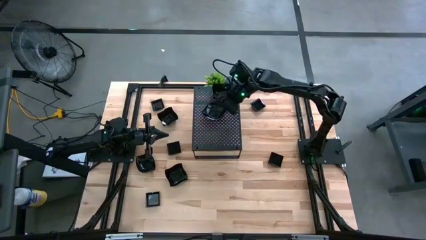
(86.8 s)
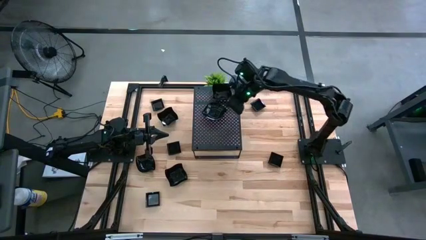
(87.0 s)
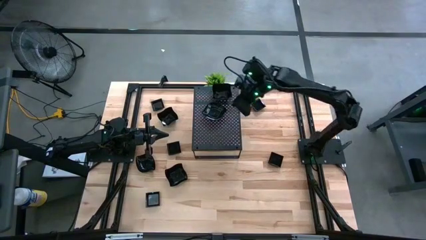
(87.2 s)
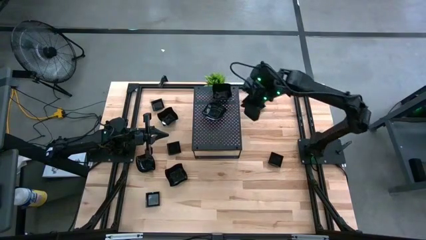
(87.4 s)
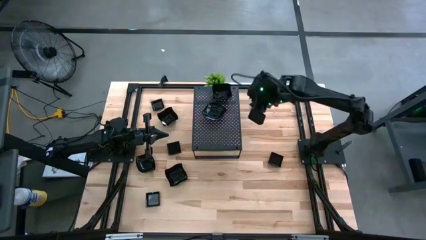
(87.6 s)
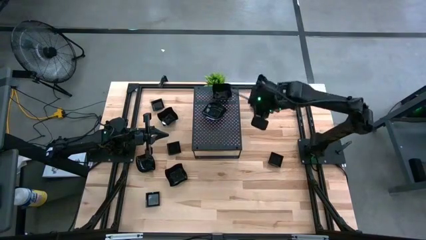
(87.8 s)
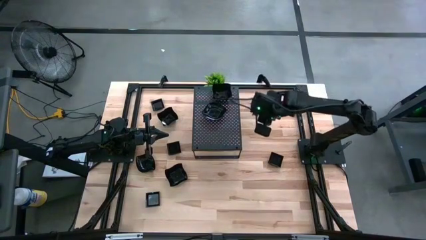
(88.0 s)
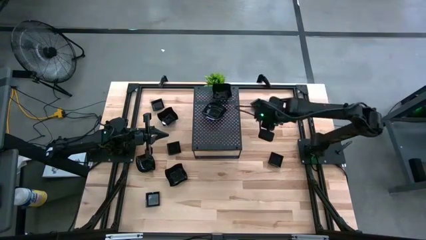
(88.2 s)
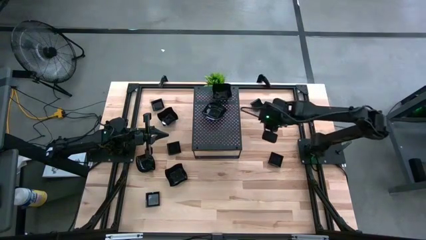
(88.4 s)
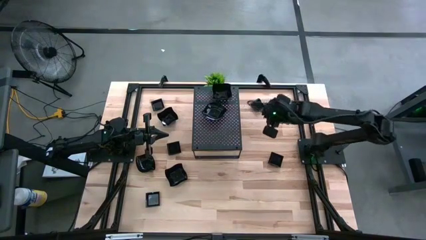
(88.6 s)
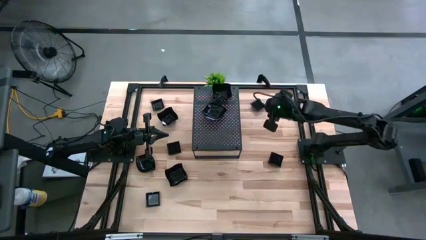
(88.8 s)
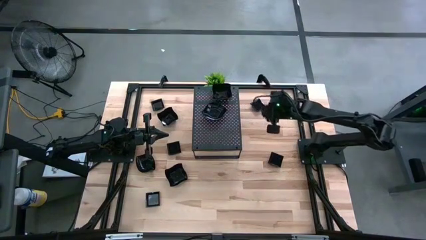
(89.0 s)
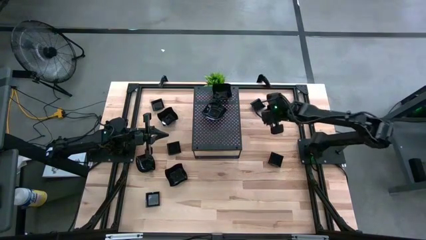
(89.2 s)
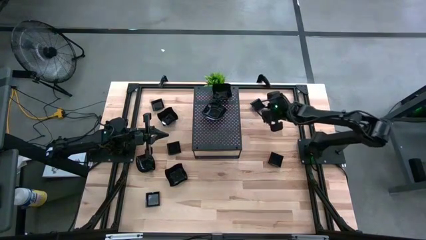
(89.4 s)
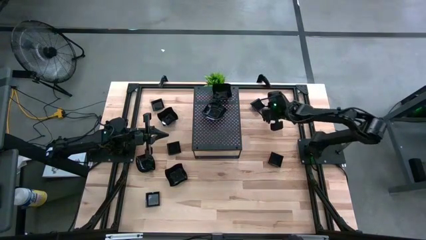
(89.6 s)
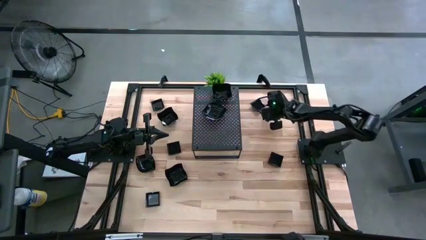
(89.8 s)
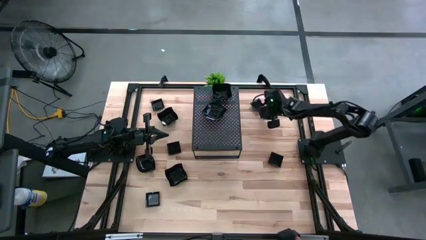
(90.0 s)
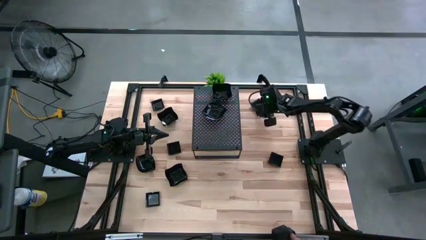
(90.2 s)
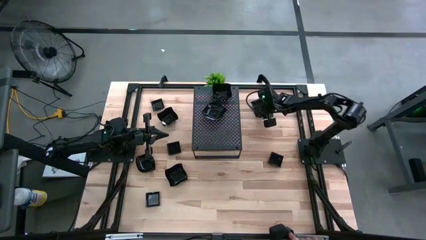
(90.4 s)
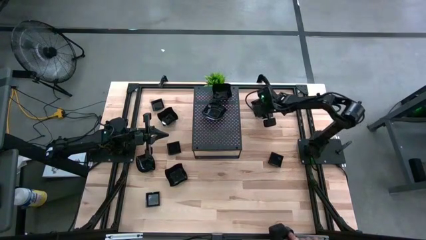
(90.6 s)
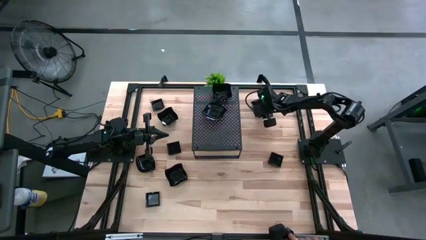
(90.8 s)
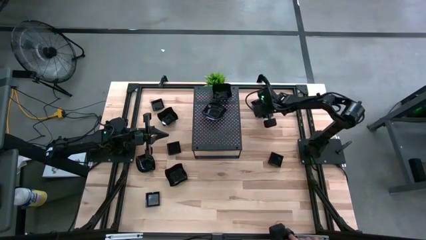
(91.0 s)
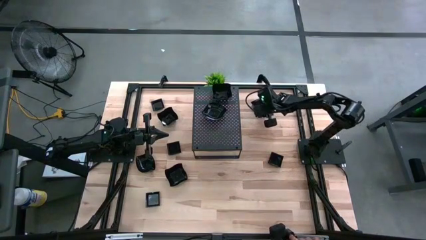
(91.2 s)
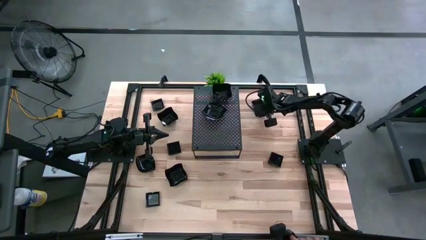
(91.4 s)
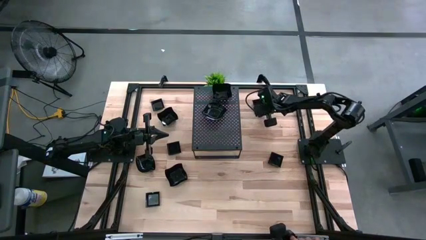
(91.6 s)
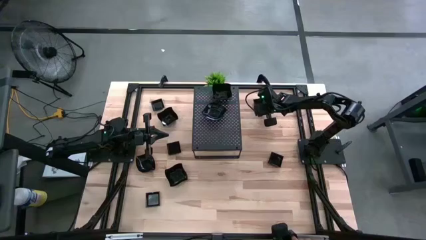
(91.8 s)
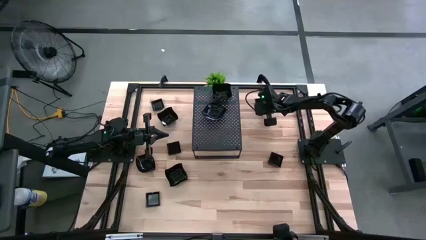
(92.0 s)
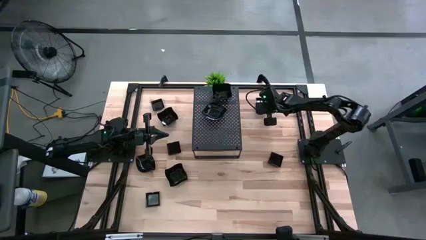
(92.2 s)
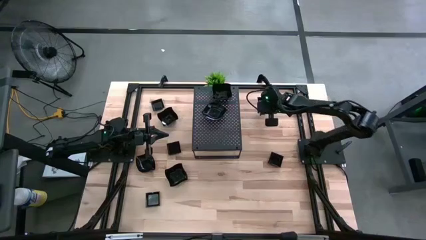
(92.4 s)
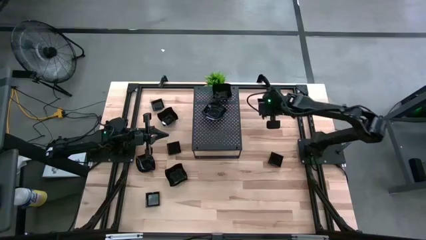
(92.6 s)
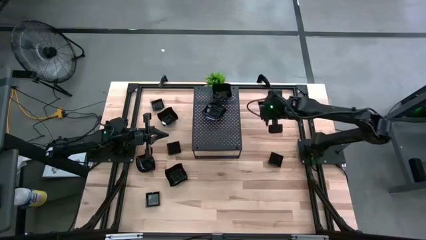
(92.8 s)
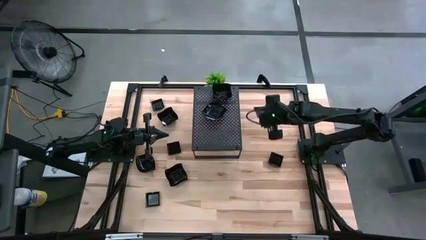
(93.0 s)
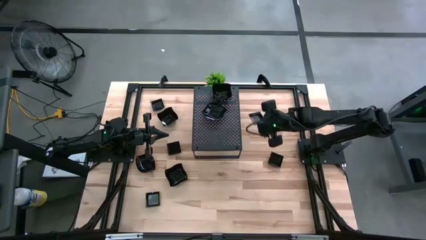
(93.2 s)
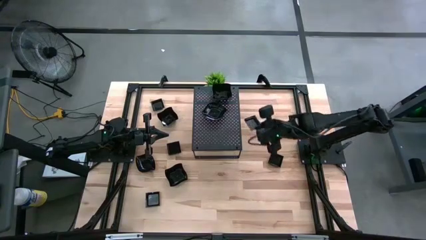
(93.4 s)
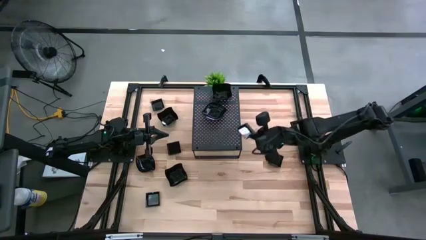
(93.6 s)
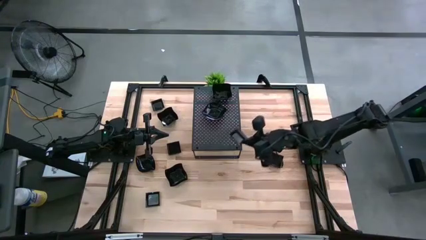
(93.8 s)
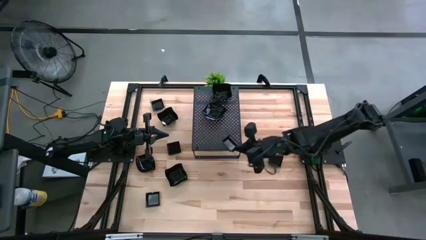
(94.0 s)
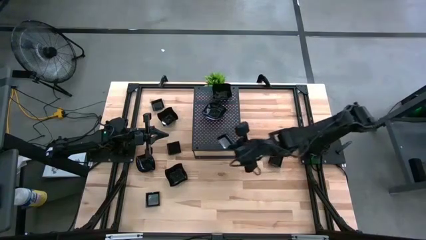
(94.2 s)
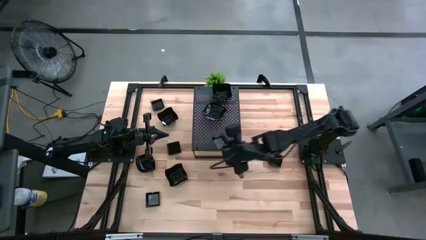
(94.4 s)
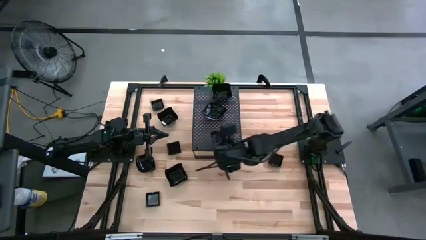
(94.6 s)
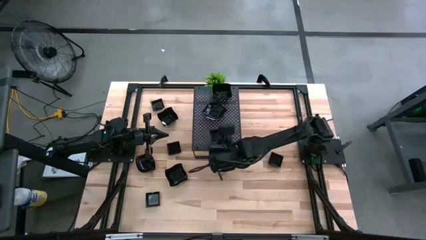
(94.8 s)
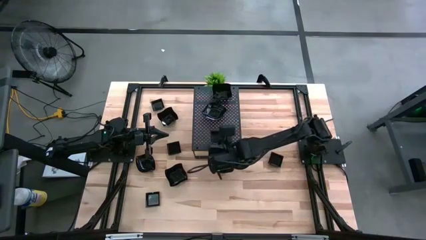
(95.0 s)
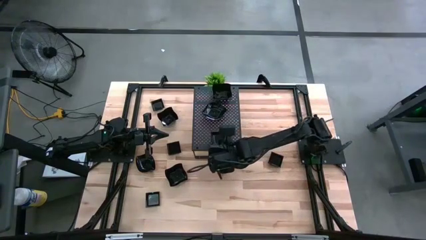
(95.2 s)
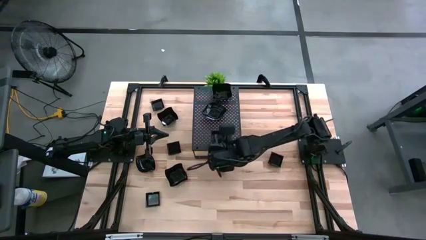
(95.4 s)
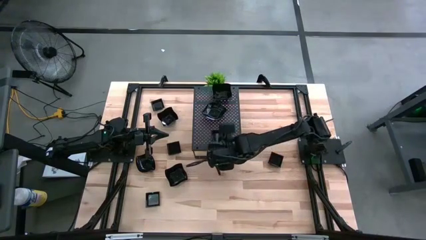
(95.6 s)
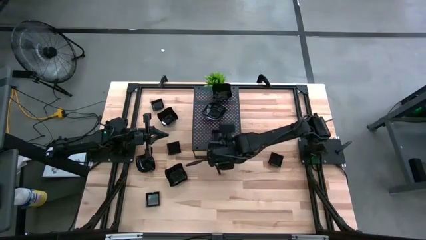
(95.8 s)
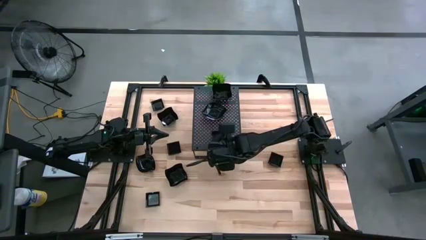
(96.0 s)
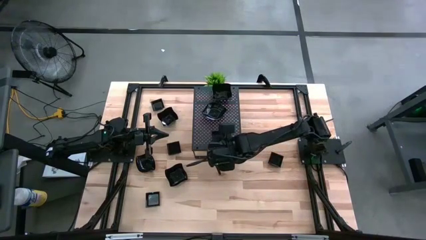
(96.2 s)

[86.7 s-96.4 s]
Task: Pick & Place Mini shaped plates
Put the square plate on the shelf

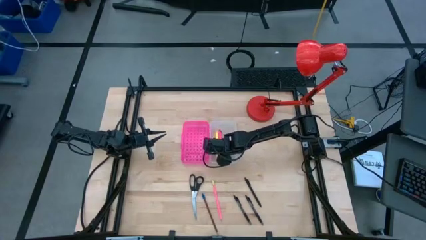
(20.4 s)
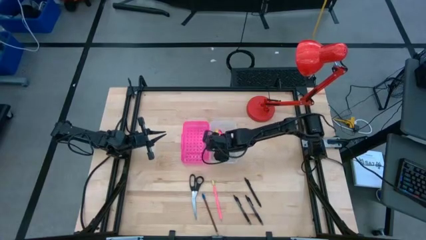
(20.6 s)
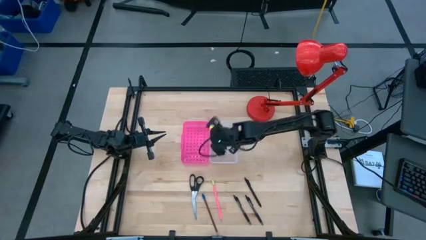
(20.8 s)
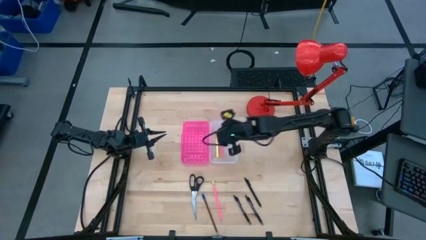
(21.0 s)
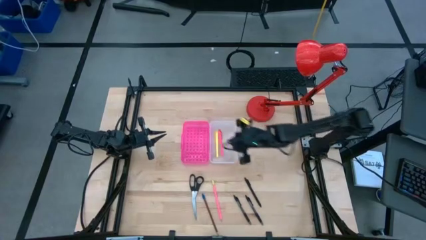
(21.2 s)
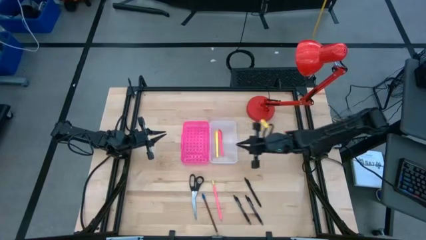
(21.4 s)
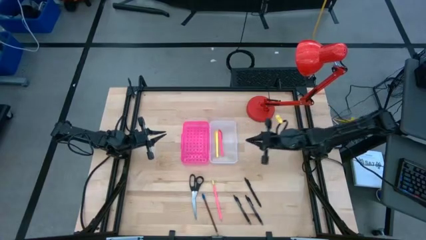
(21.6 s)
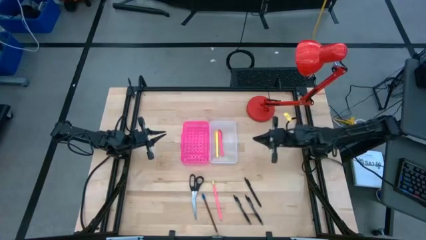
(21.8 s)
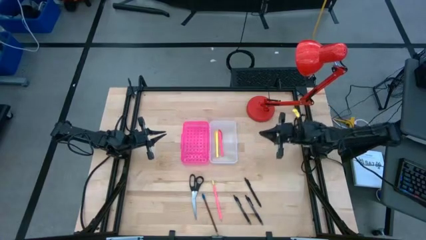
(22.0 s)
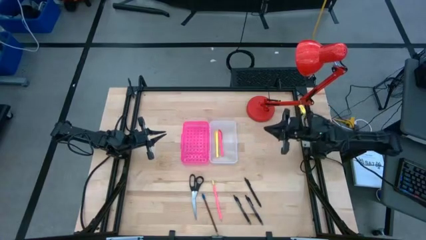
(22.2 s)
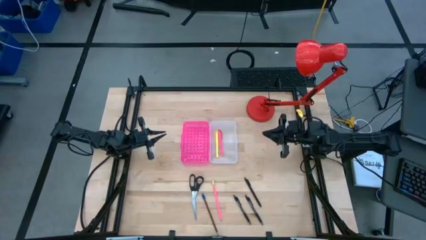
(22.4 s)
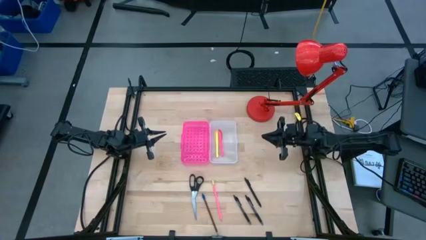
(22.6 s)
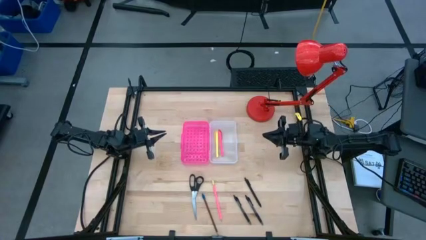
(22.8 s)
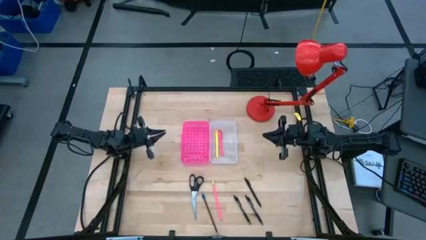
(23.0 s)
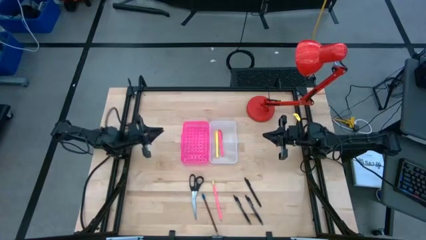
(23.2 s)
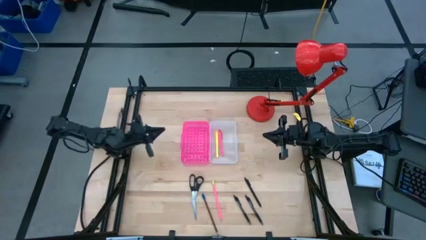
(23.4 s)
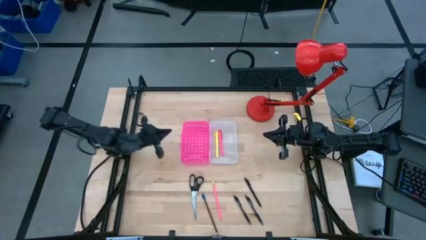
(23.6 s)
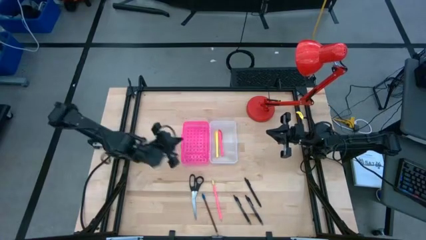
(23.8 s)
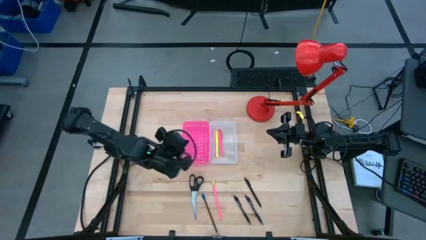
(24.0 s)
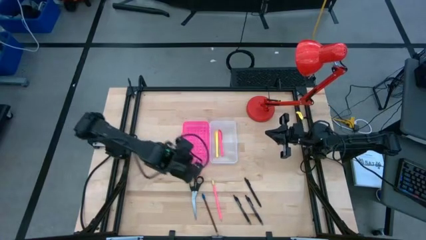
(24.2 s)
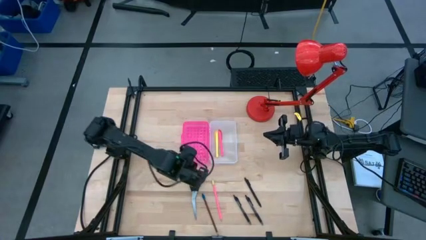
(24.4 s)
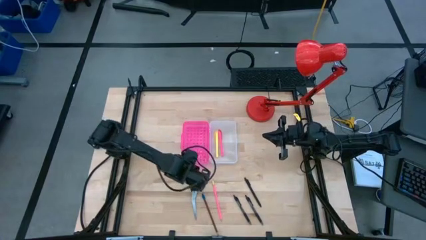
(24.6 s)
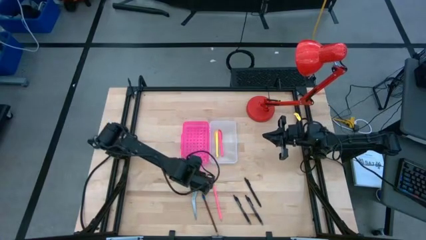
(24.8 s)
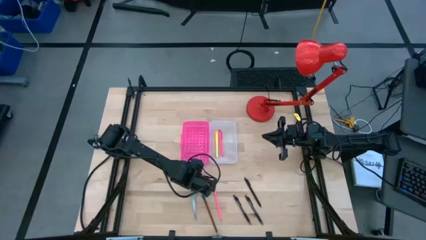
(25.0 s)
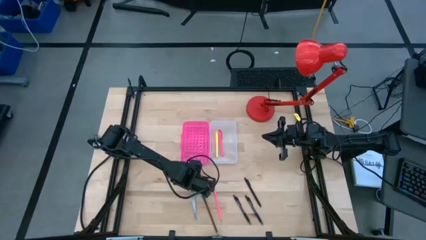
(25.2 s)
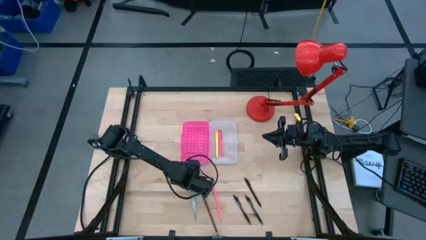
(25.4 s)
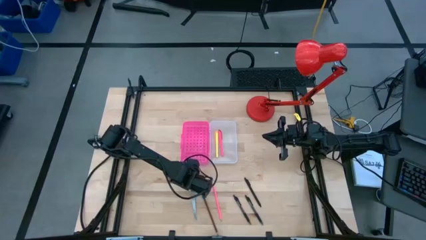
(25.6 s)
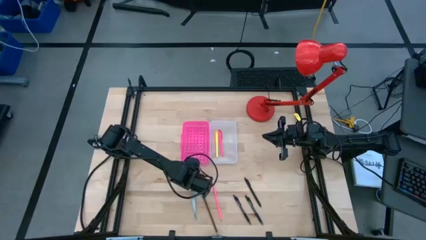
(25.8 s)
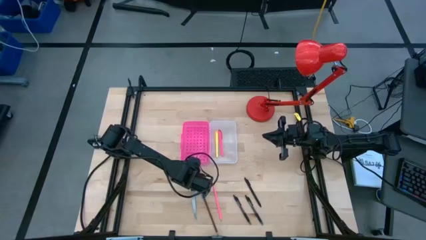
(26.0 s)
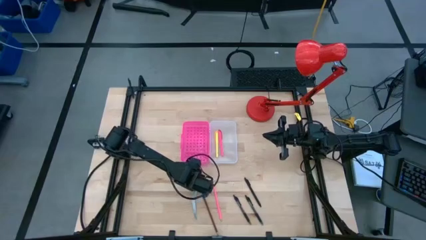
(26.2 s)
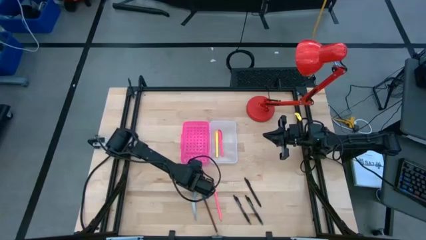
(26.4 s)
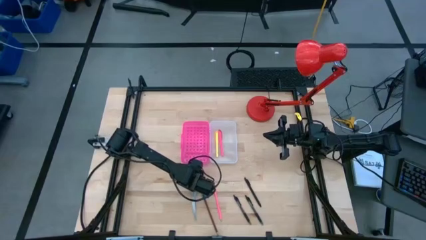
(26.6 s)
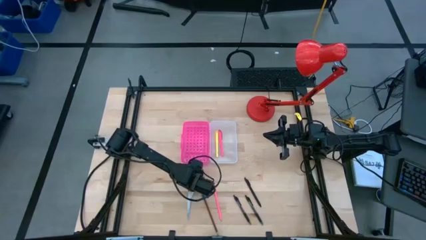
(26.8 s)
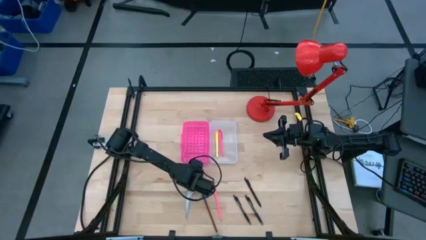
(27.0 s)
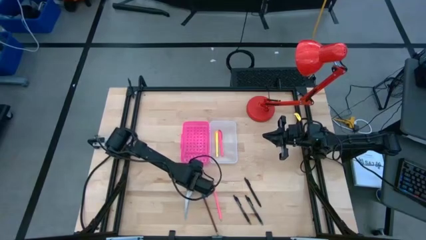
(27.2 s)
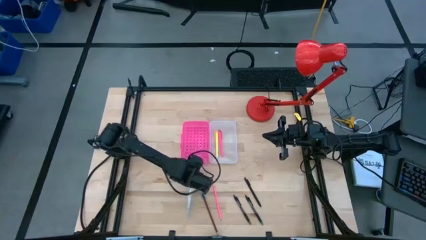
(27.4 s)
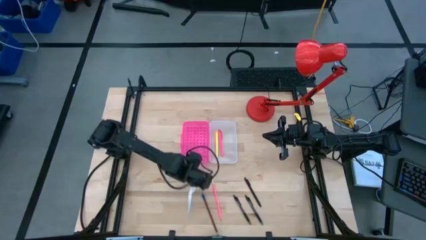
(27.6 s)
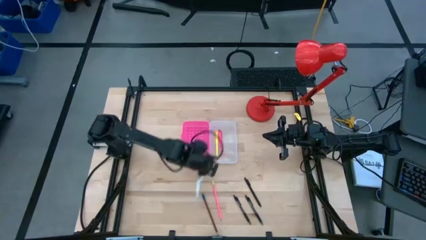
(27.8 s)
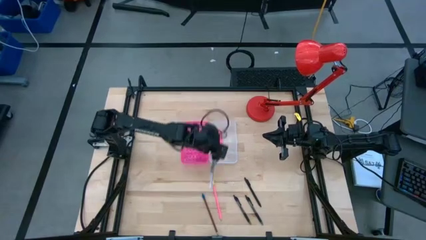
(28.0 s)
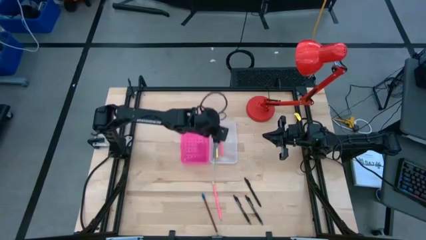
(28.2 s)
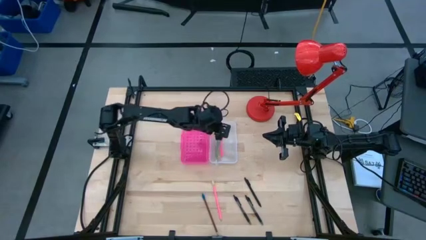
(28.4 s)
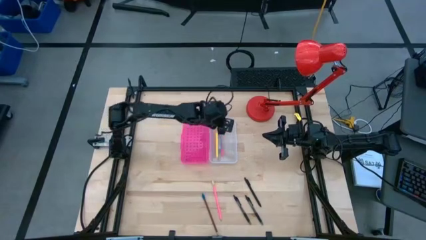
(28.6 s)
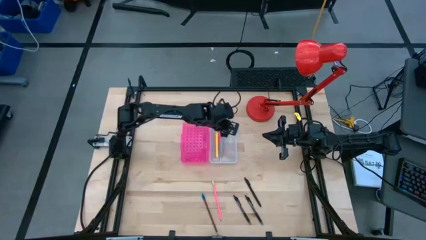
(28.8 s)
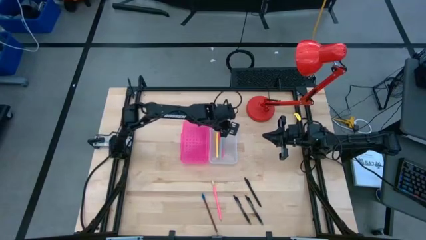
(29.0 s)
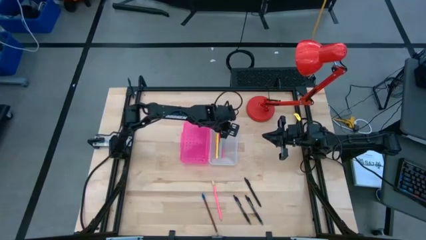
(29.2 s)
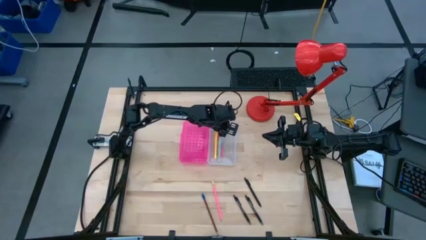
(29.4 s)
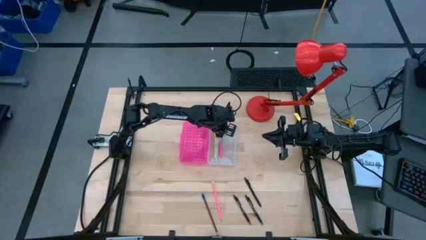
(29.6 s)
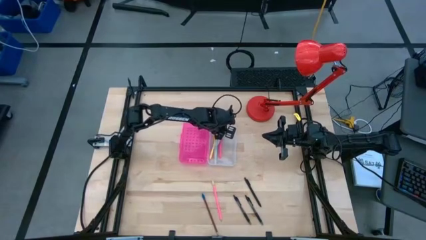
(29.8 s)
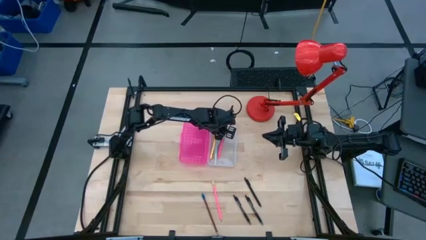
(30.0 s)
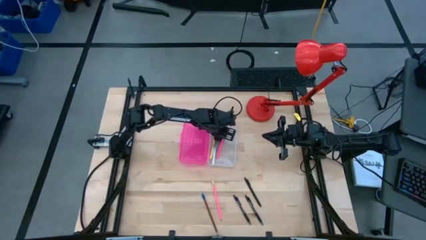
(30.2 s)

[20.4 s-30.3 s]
Task: Pick & place school supplies into a supply box
Put the black scissors into the supply box
